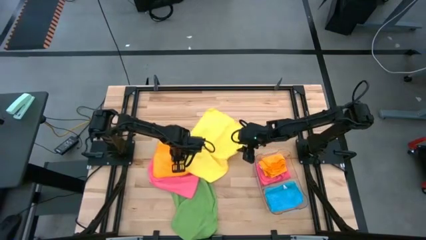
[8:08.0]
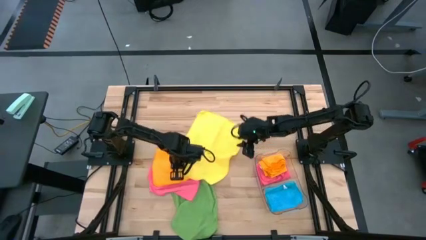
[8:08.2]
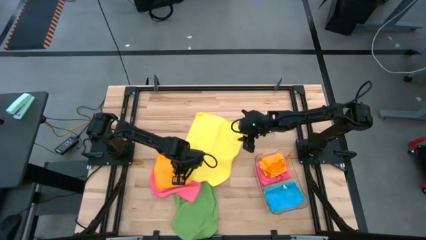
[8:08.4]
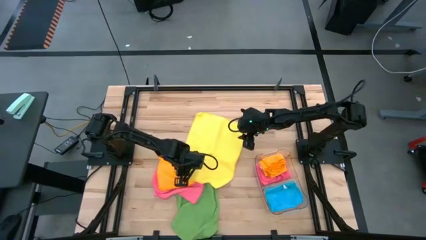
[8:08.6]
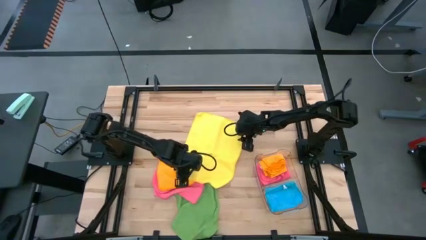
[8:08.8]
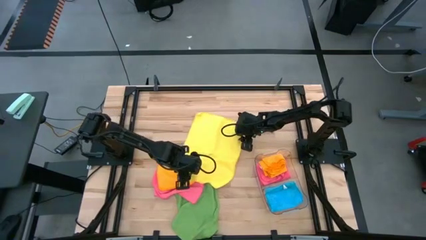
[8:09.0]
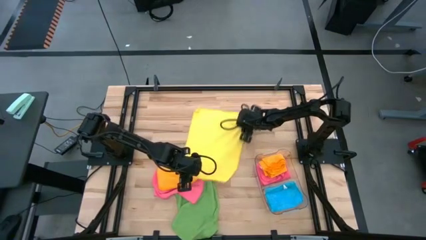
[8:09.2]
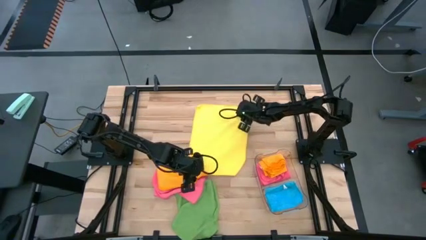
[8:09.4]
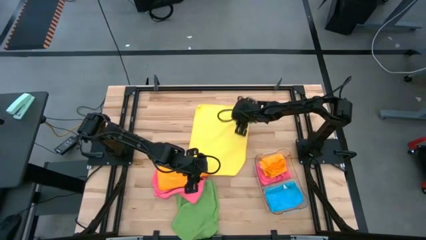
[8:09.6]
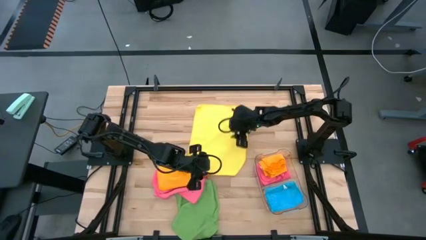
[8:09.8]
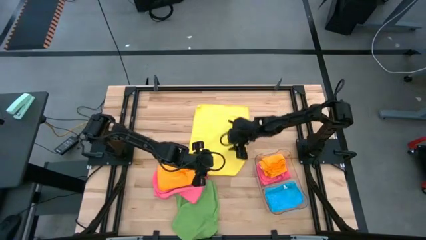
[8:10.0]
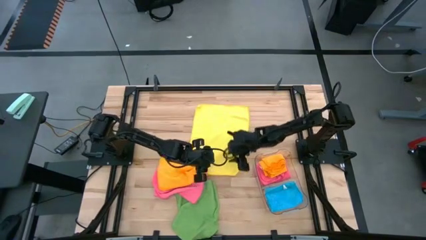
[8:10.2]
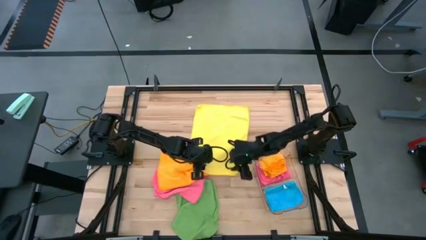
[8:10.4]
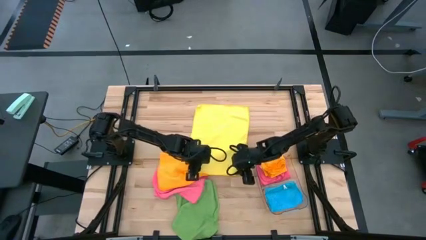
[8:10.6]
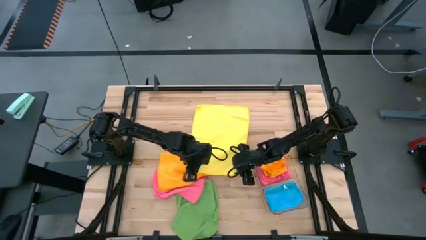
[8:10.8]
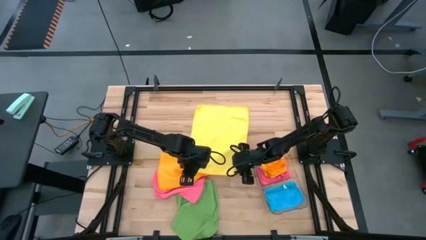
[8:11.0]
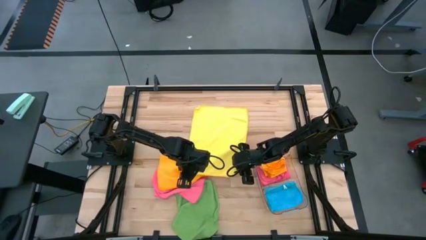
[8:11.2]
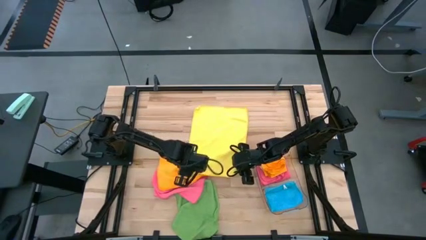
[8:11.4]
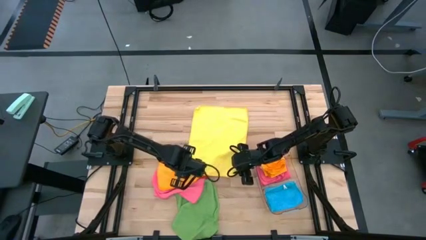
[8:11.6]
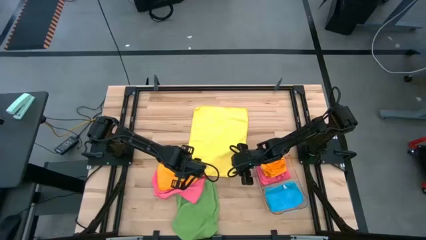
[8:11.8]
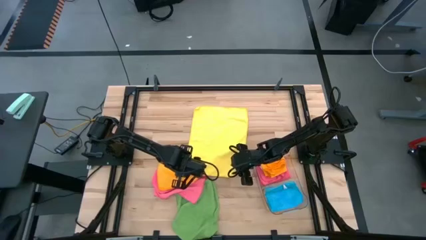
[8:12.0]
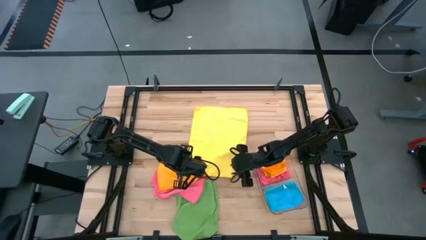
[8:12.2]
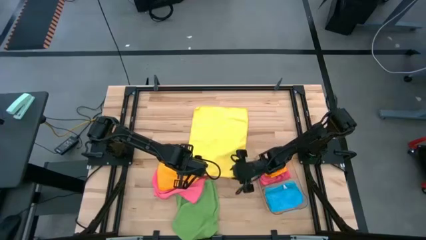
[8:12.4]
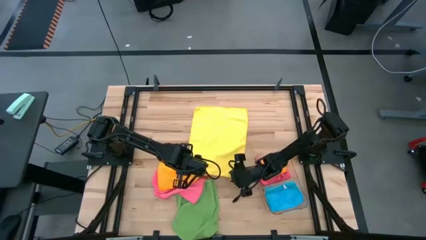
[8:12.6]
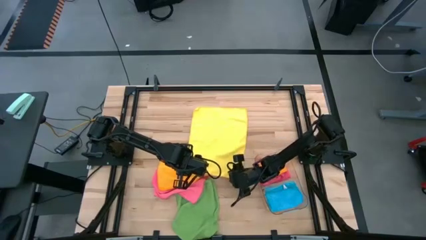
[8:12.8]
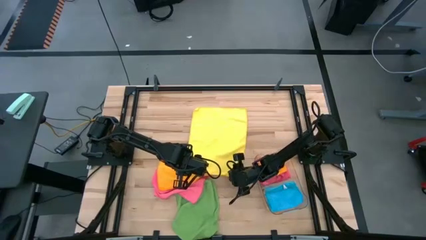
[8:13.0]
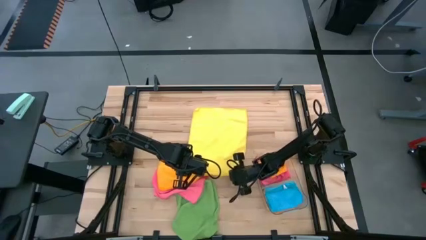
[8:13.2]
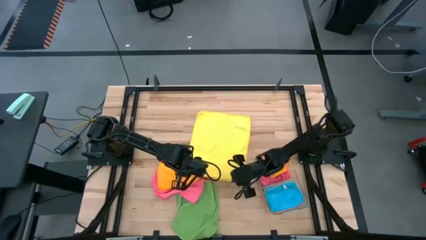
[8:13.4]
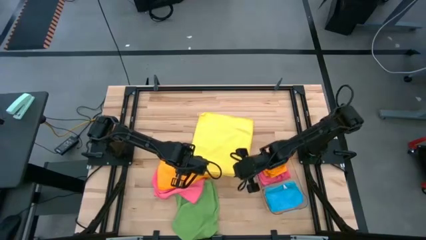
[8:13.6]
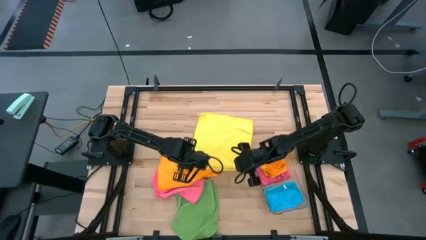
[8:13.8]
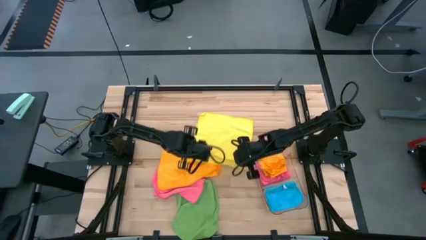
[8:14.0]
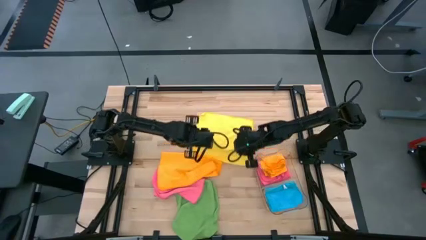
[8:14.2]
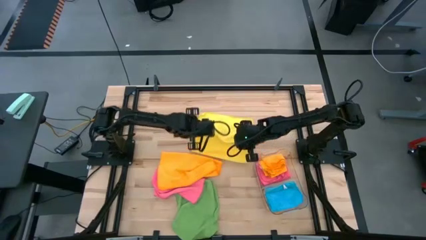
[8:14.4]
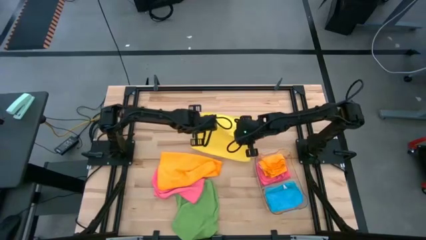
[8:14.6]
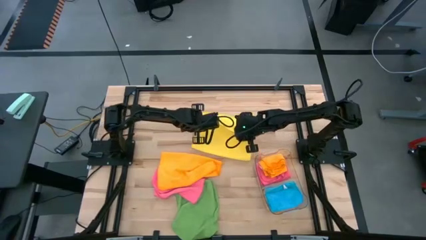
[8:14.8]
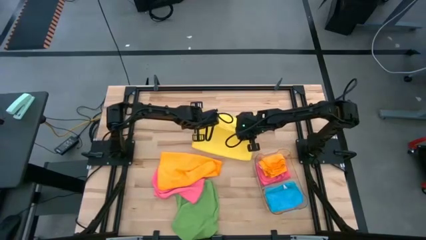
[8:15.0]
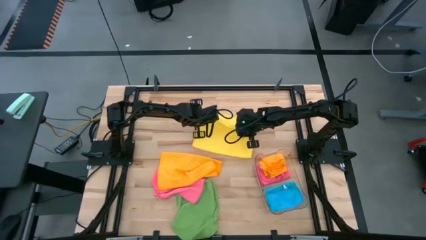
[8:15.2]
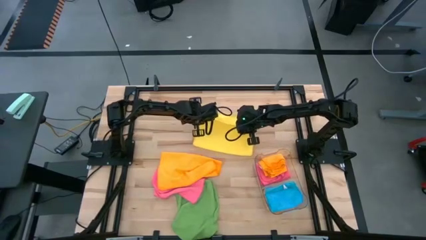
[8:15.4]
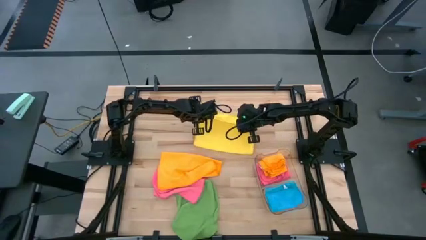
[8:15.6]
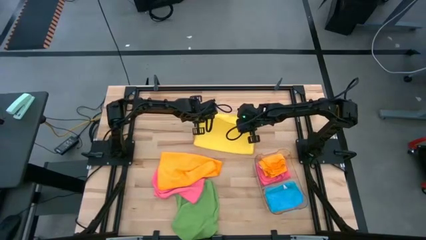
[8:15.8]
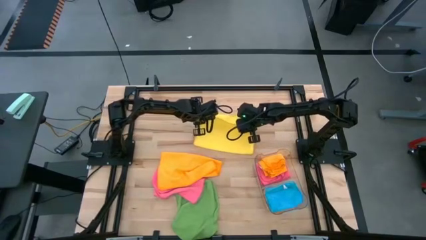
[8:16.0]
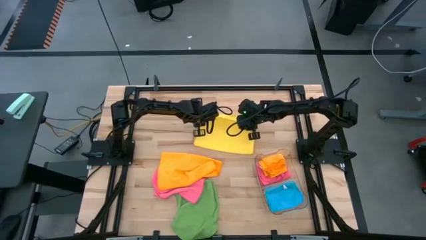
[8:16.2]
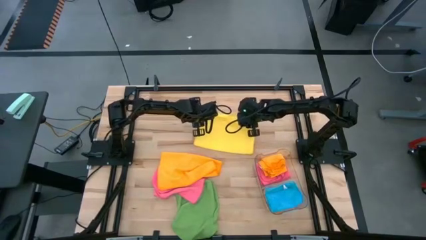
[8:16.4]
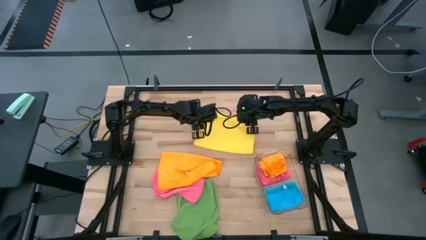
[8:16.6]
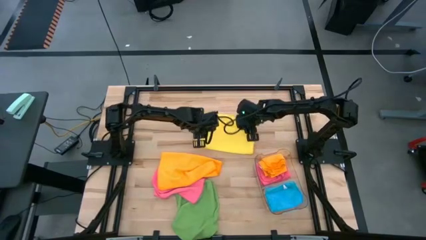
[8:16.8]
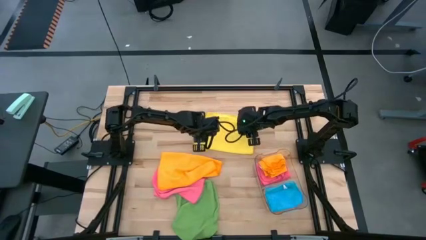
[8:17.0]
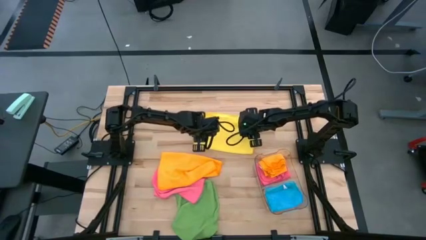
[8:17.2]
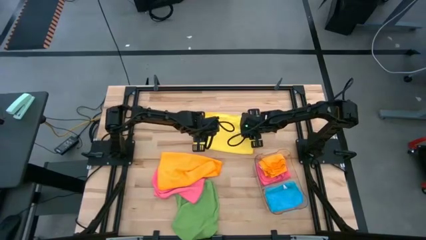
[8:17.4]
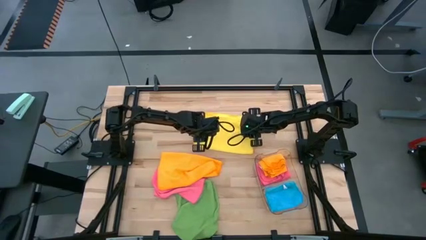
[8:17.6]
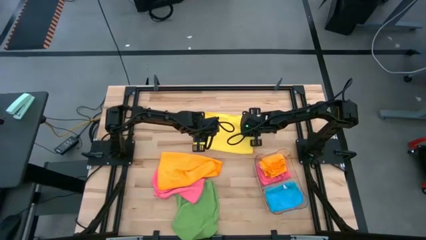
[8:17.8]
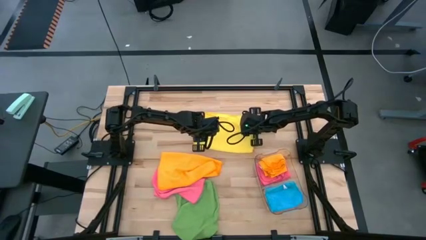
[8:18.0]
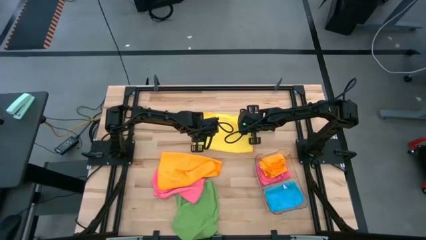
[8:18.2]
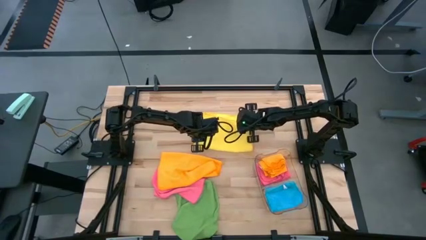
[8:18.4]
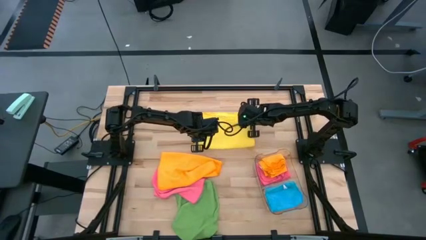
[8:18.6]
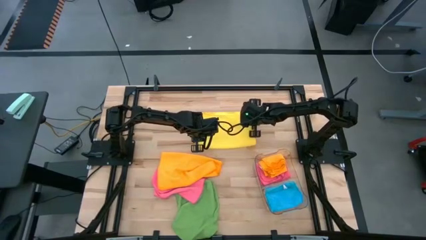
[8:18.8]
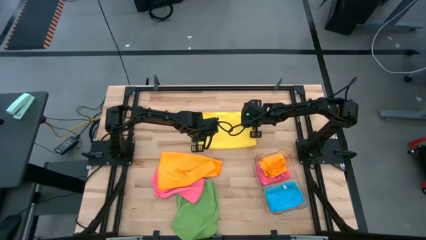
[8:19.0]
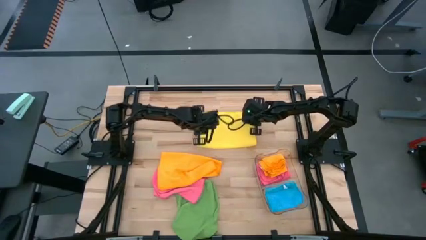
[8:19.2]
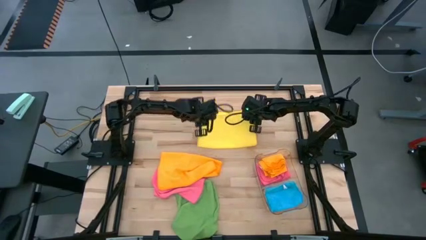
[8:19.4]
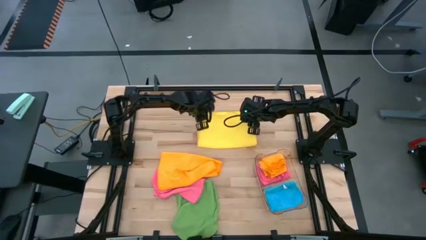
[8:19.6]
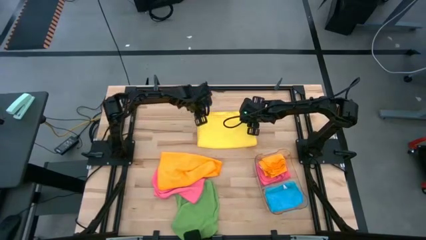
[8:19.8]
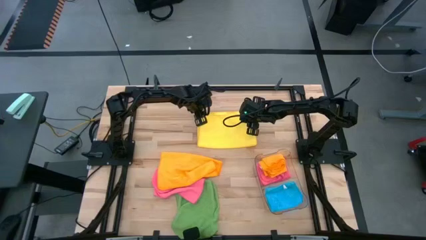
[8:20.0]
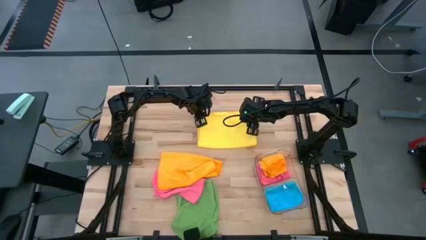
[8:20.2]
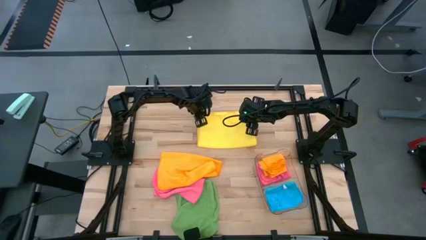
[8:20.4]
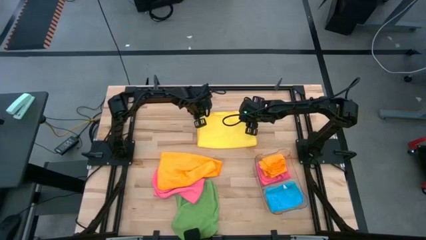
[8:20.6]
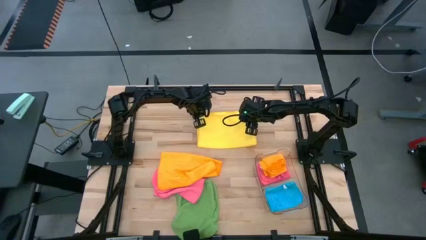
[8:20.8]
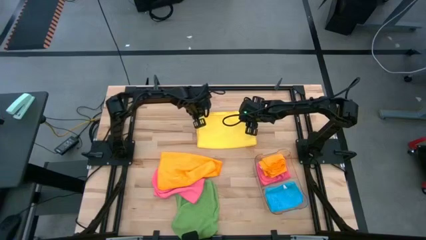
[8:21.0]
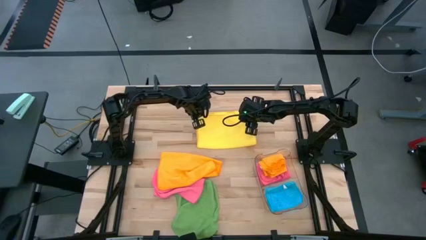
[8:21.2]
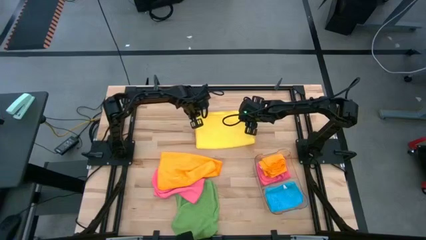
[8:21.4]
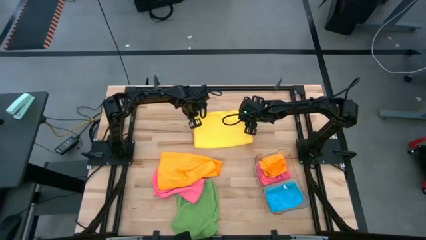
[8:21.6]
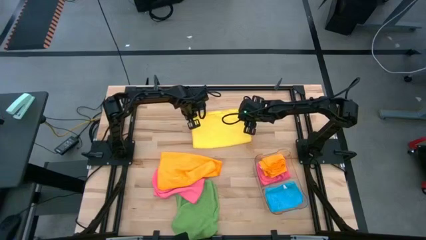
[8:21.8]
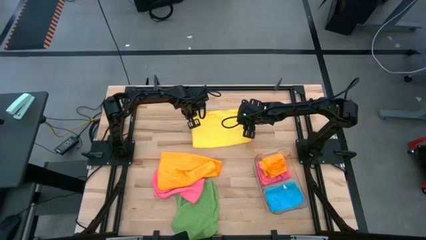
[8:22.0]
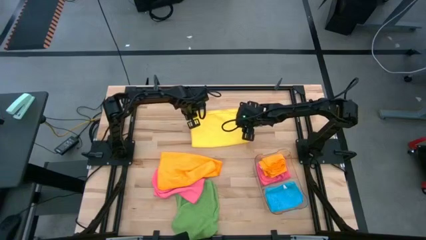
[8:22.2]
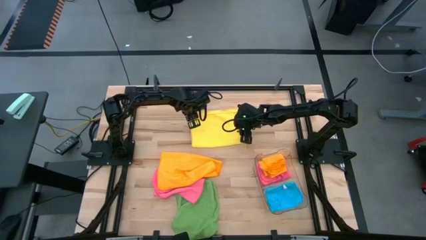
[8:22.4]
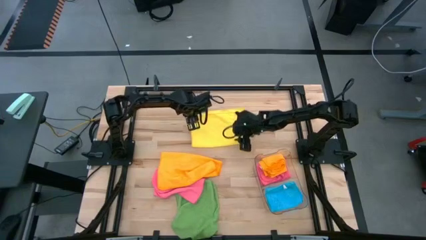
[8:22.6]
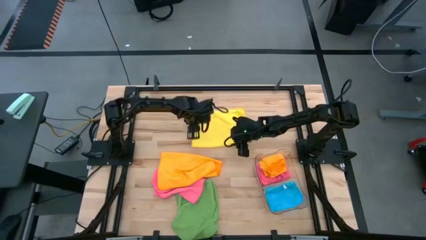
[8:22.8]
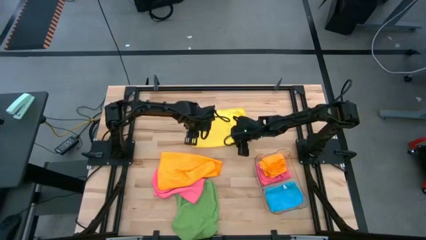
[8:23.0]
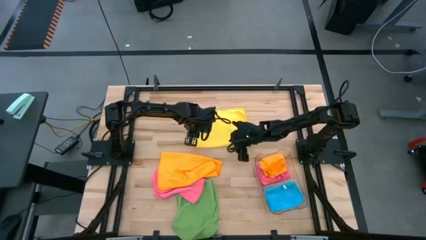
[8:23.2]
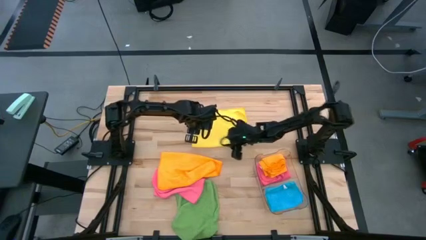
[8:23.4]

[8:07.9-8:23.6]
Task: Fold microfiber towels
Fold the yellow towel
